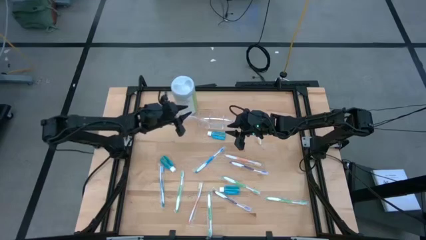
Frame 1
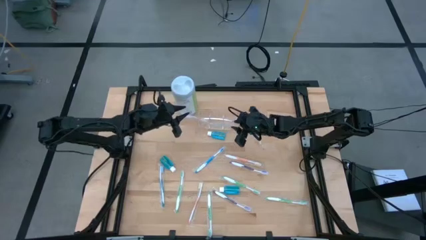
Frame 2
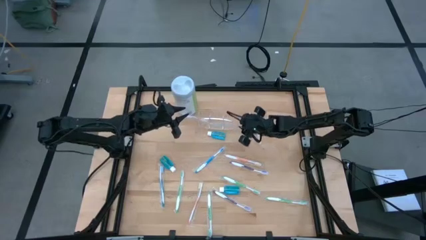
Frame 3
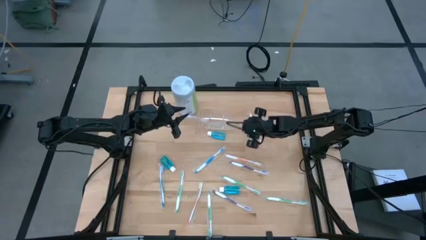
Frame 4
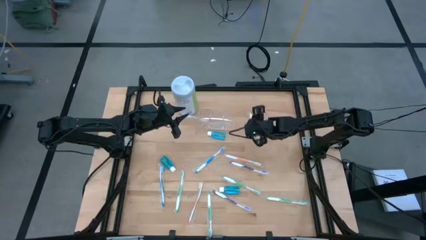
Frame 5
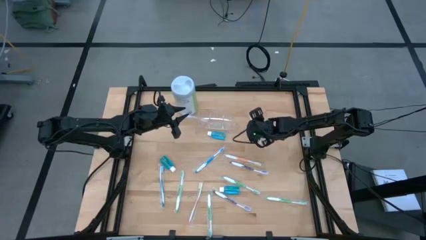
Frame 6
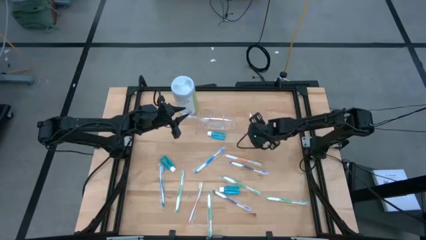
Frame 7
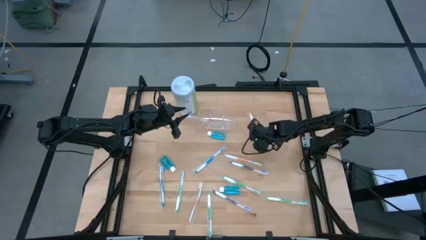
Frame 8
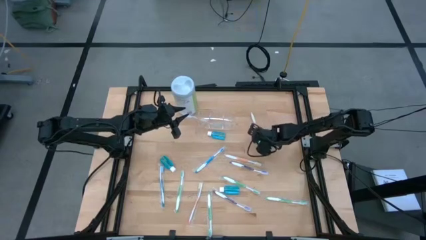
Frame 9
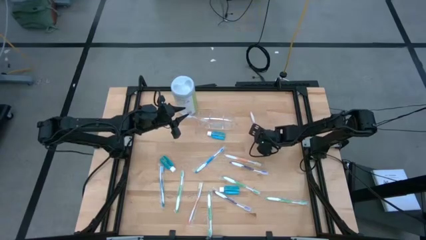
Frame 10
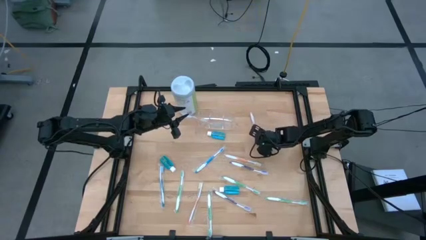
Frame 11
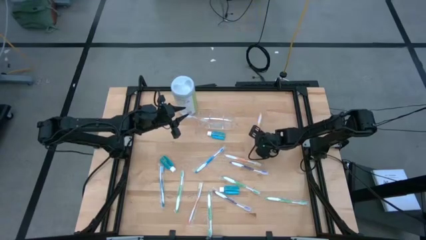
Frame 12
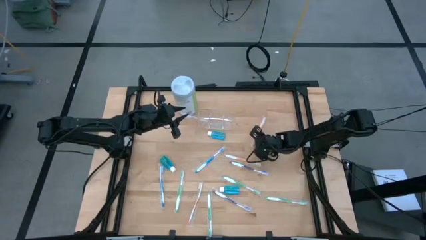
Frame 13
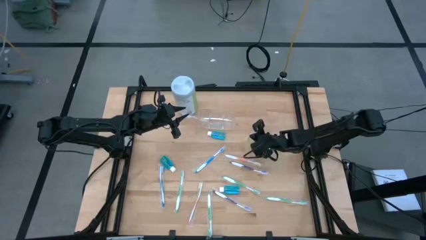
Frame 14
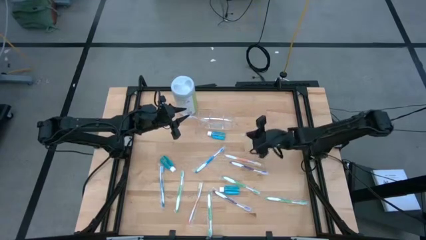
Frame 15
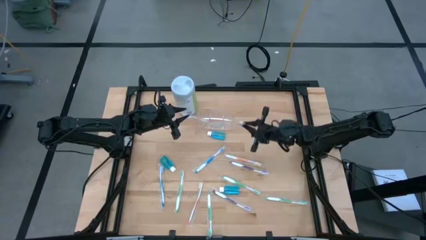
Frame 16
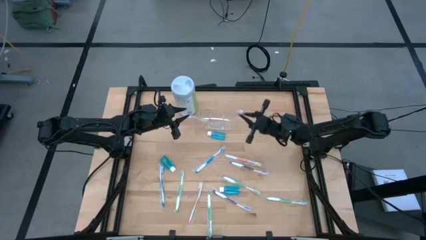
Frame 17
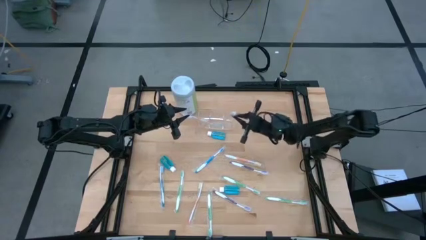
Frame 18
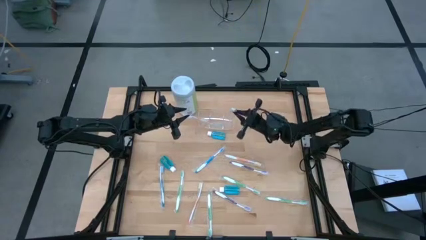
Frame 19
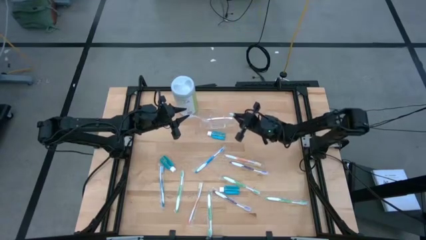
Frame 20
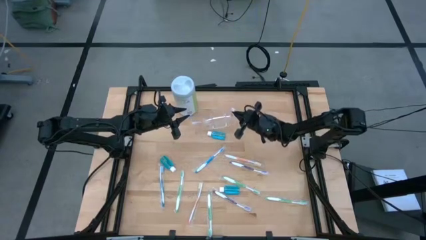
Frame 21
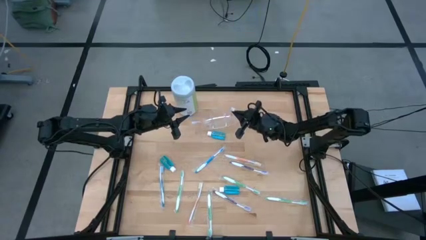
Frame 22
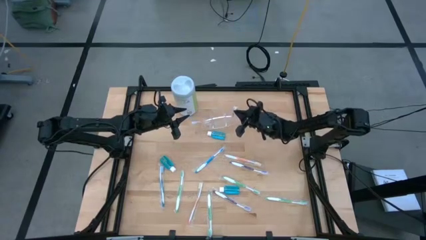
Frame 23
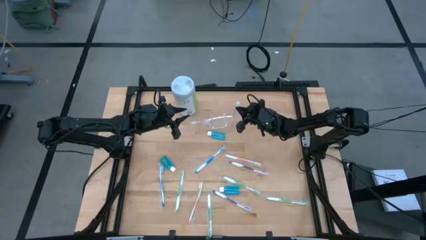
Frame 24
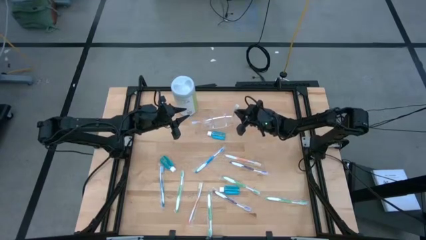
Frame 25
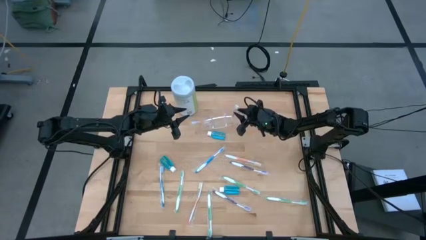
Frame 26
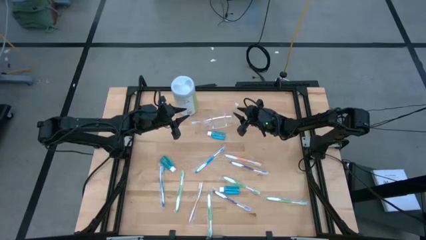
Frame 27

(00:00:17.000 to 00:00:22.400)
Task: Pick & Place toothbrushing station
Put the orange toothbrush into the transparent organizer

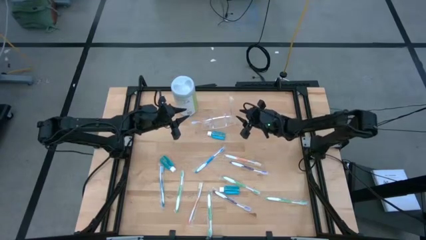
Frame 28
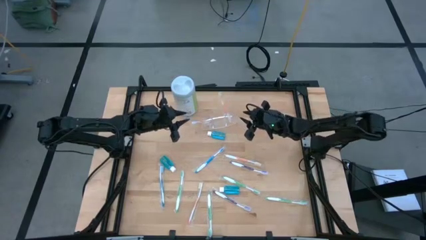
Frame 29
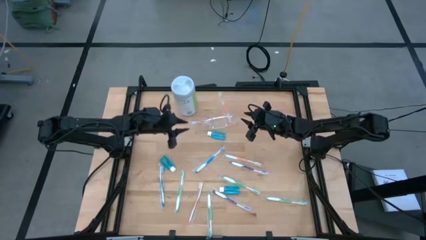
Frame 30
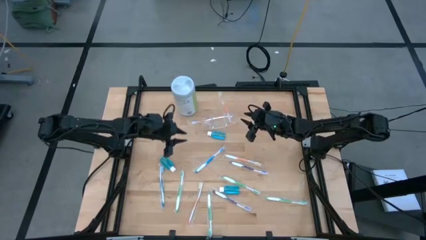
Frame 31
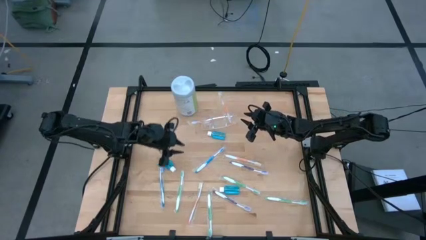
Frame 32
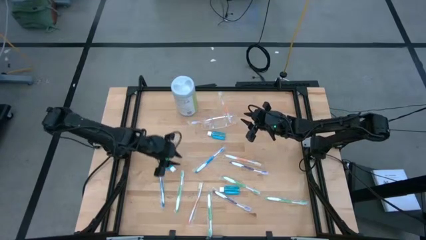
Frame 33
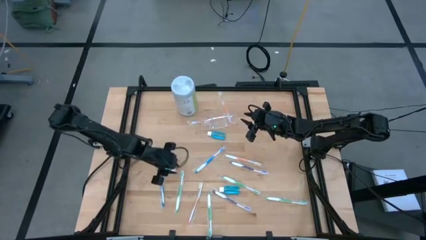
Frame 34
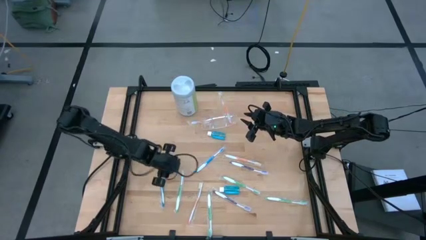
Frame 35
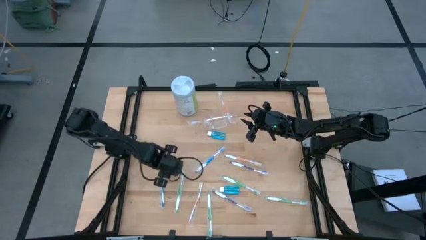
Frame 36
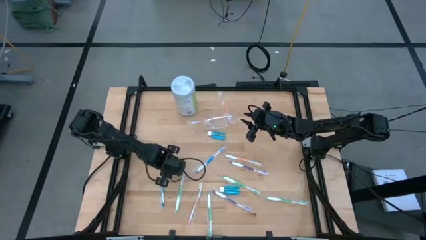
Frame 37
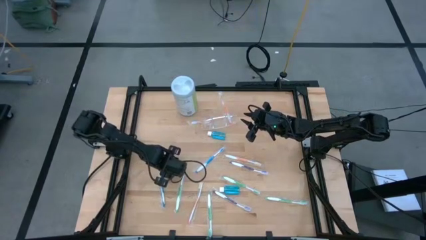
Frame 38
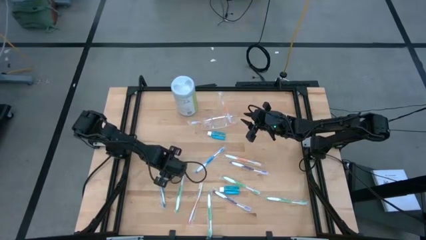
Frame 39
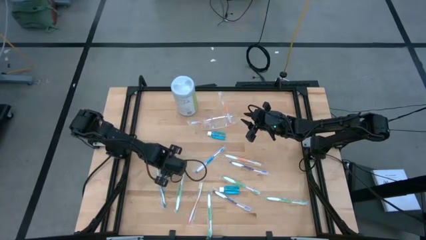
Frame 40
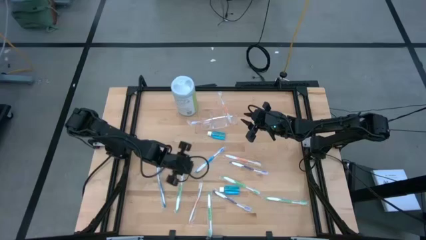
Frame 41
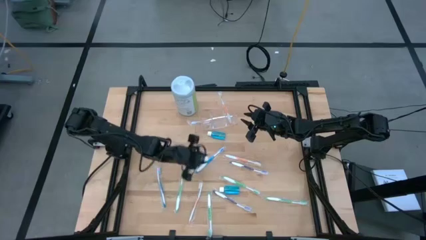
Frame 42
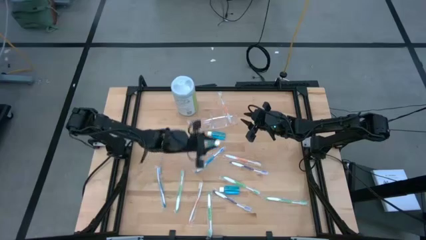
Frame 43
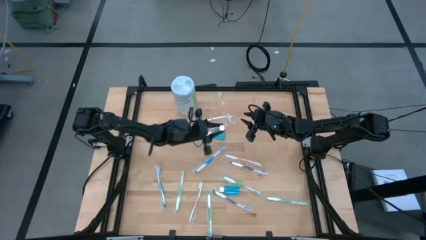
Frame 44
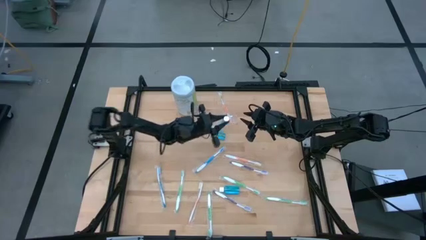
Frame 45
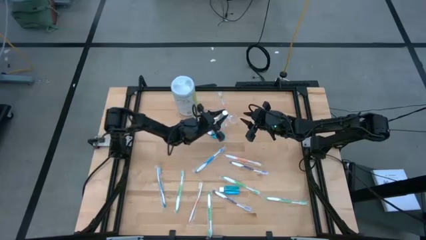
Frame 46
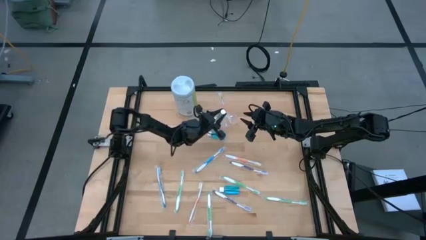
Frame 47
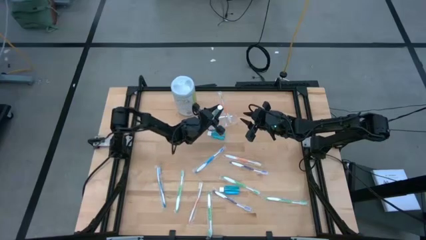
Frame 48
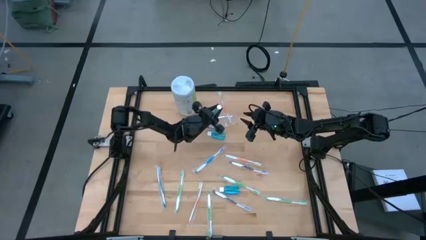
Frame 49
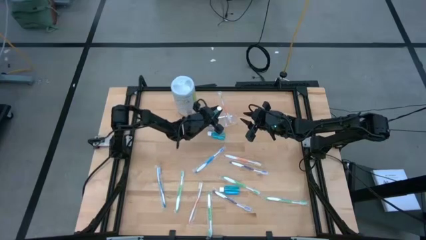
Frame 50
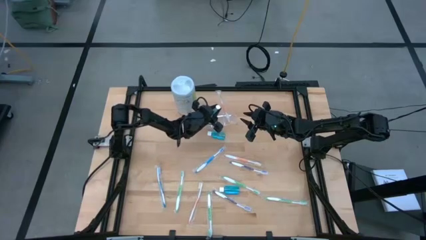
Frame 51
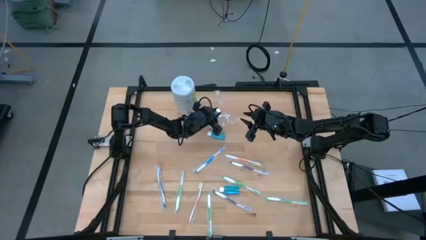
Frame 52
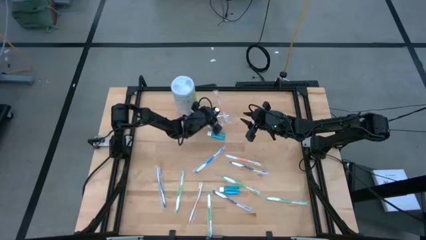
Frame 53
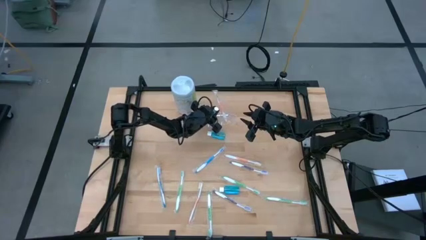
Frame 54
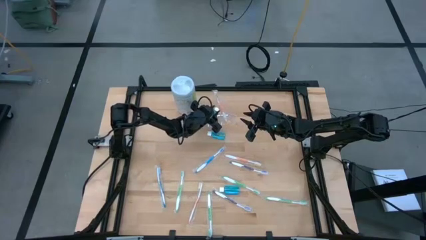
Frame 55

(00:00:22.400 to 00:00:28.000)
Put the mouthwash into the transparent organizer

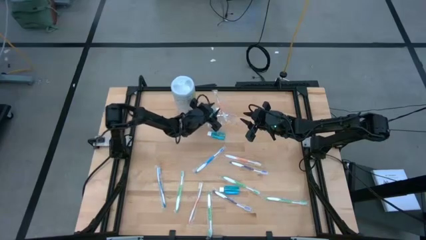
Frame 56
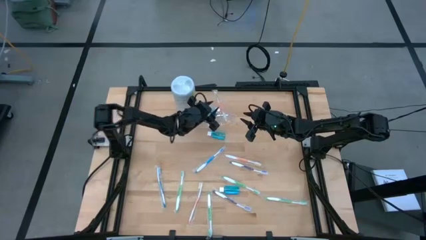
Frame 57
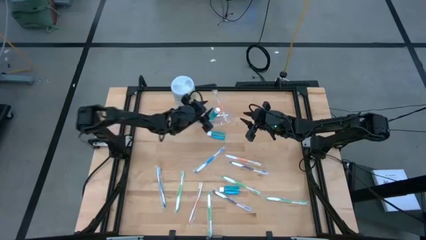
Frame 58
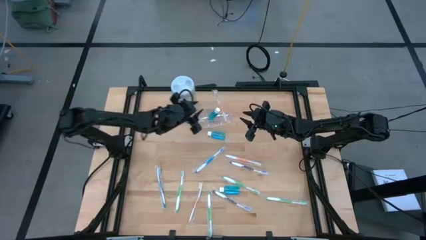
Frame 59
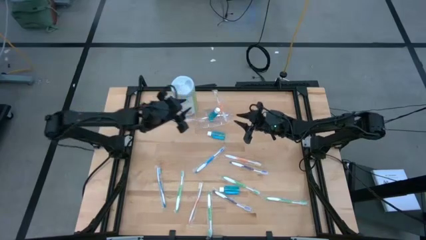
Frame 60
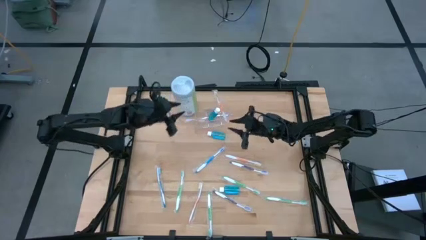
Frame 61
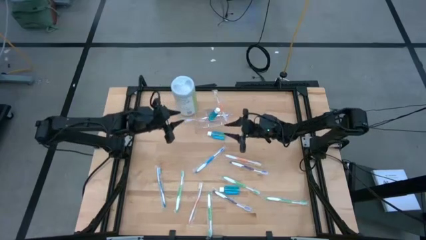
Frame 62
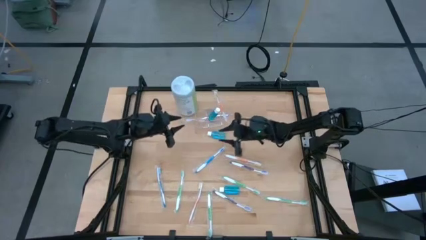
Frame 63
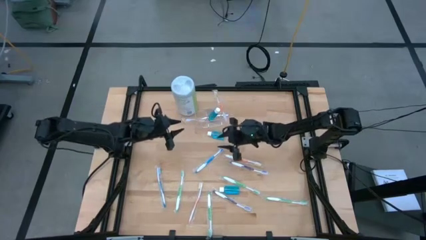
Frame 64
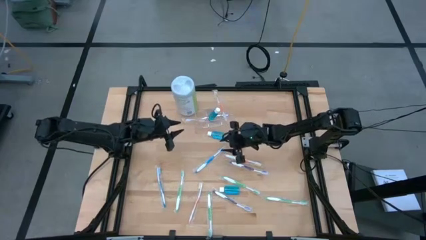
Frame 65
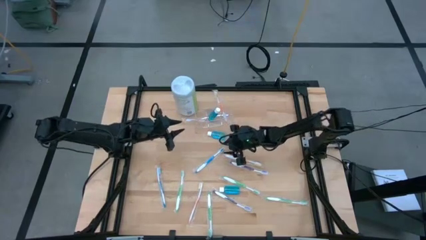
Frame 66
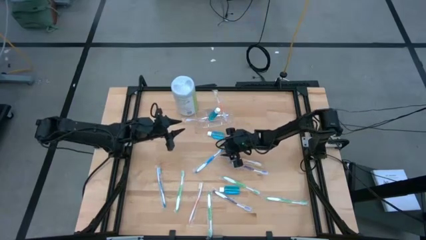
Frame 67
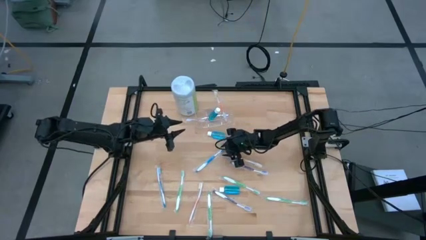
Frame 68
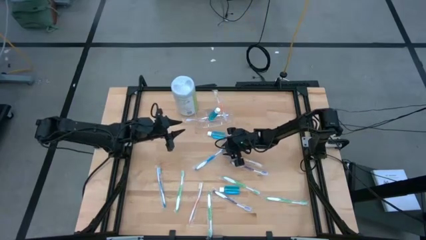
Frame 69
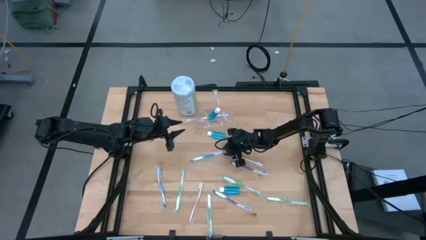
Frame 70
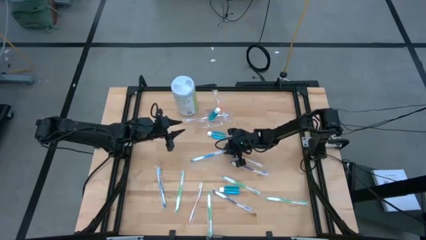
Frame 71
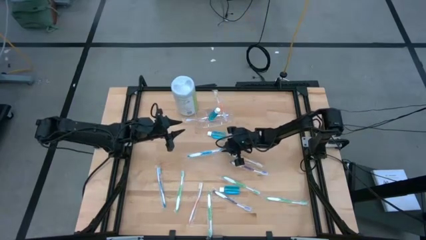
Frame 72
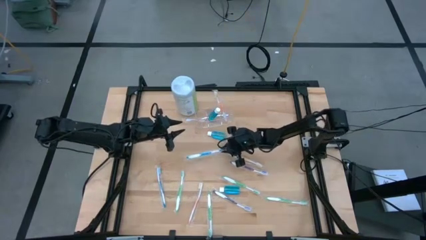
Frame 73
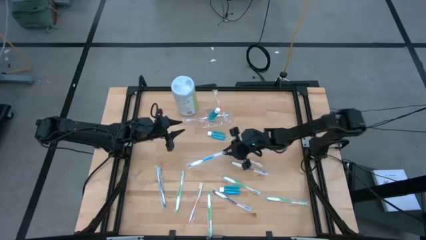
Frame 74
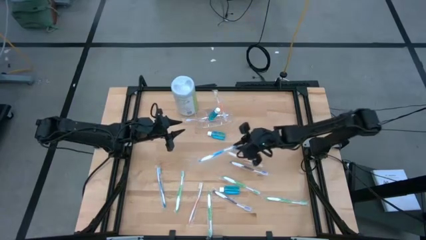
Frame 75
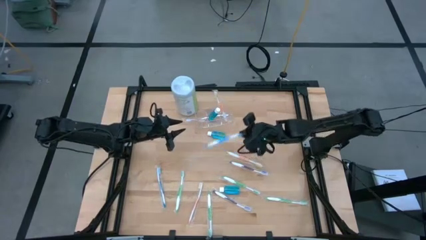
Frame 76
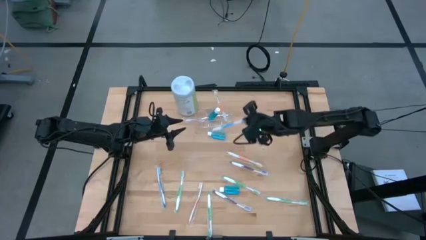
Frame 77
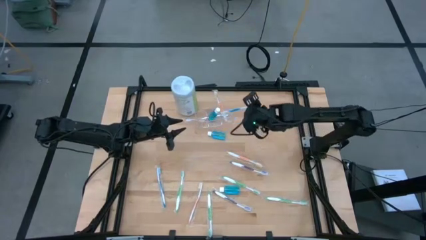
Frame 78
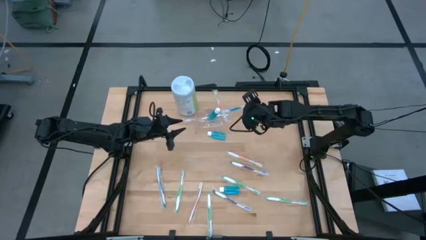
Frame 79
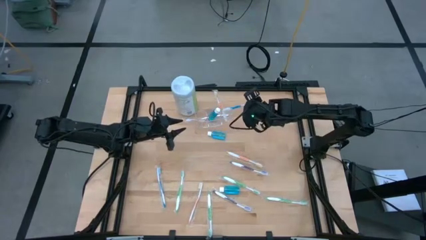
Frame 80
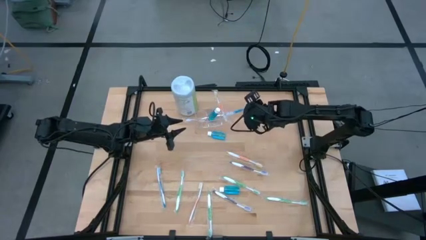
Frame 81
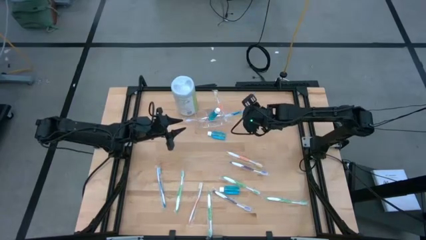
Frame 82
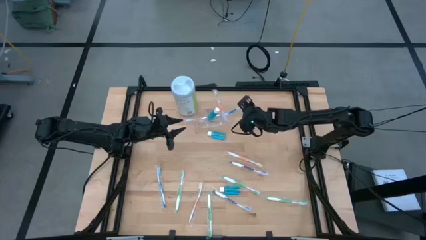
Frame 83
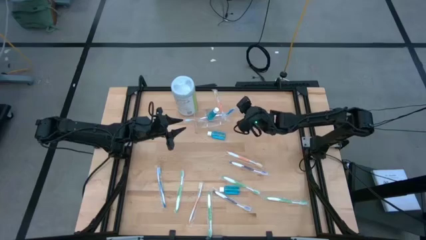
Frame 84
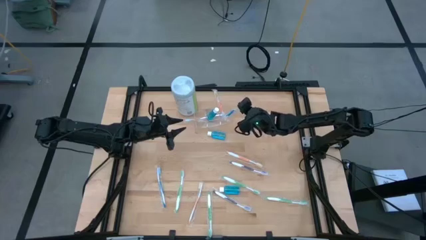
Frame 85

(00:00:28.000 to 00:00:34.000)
Put the blue toothbrush into the transparent organizer
